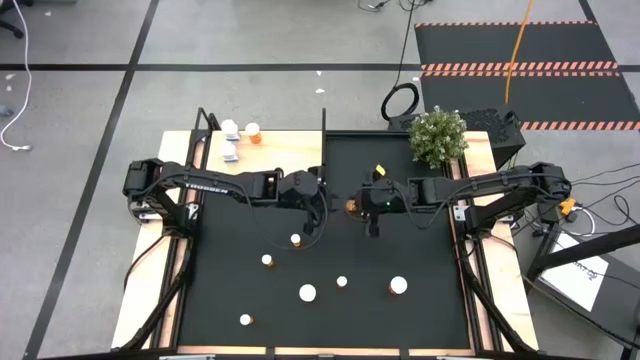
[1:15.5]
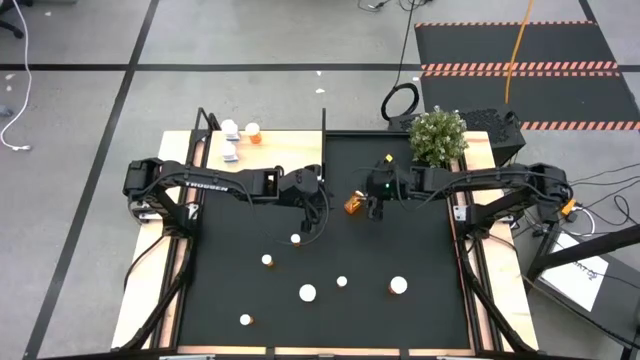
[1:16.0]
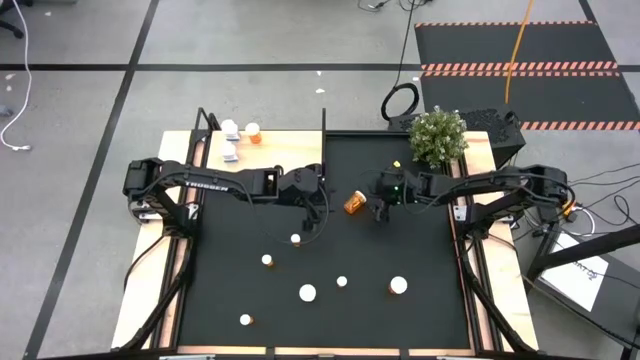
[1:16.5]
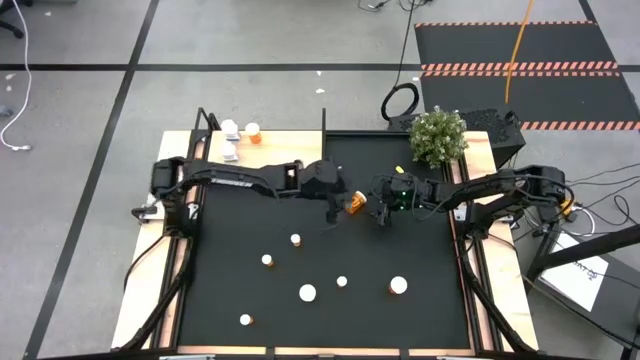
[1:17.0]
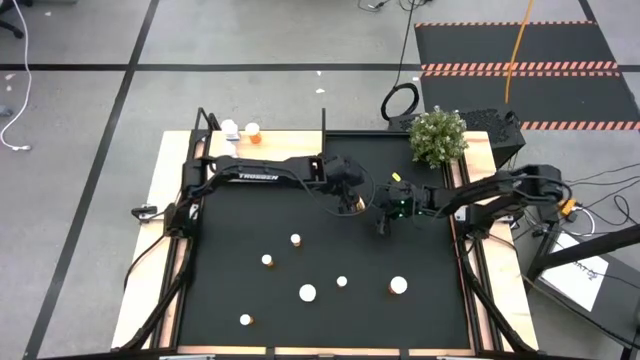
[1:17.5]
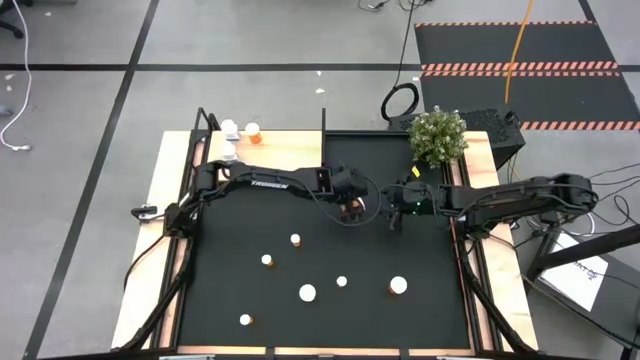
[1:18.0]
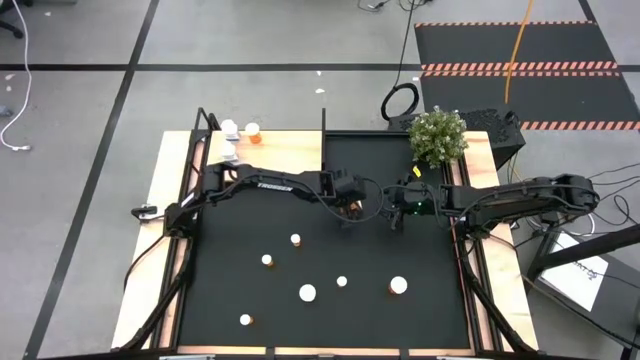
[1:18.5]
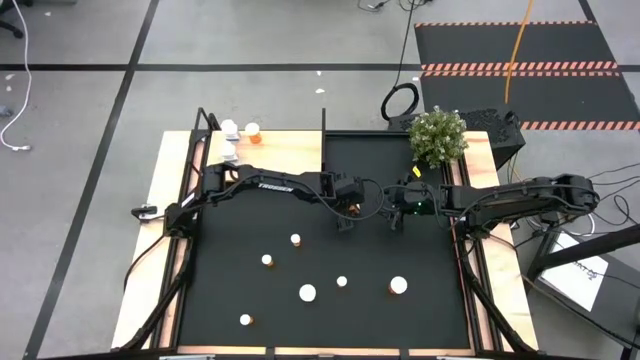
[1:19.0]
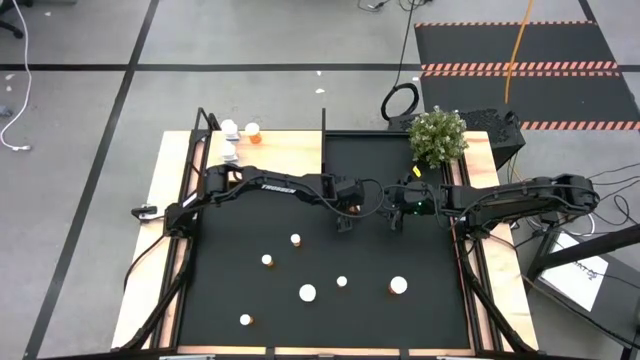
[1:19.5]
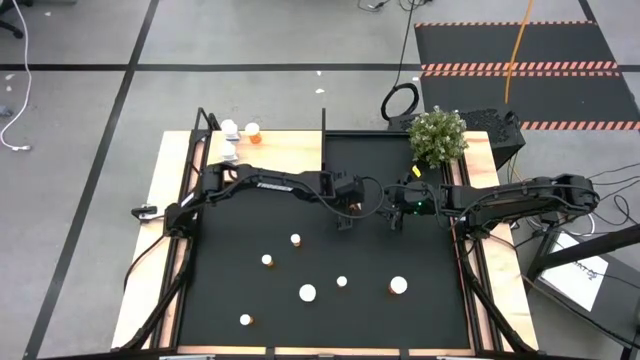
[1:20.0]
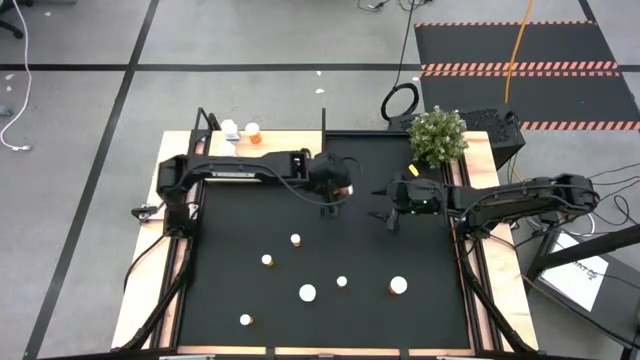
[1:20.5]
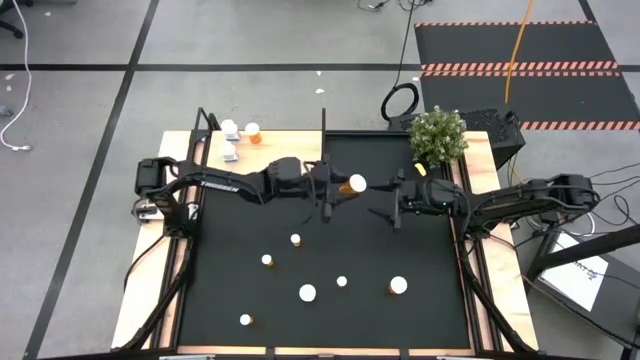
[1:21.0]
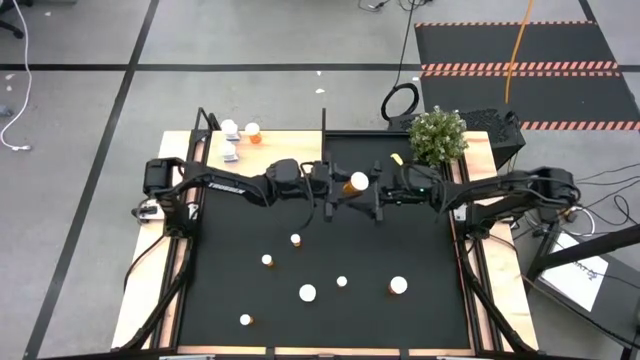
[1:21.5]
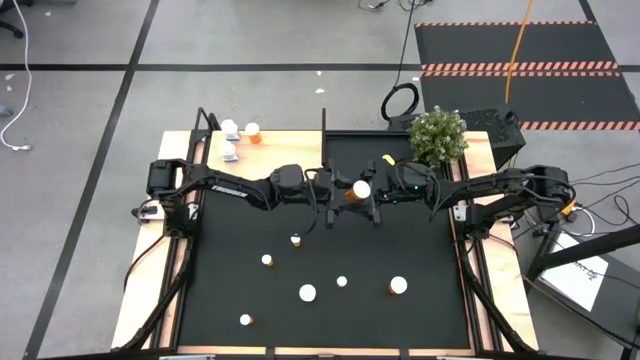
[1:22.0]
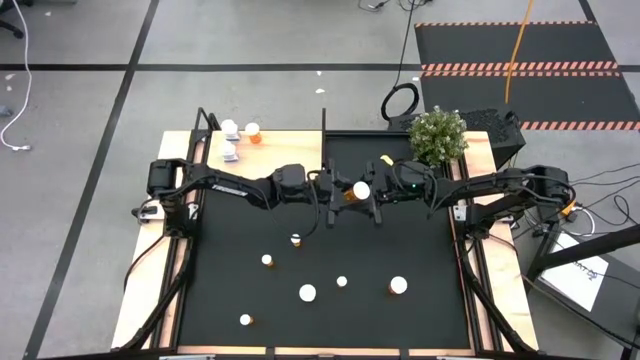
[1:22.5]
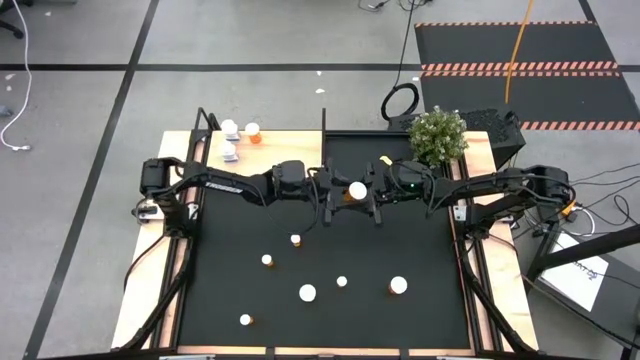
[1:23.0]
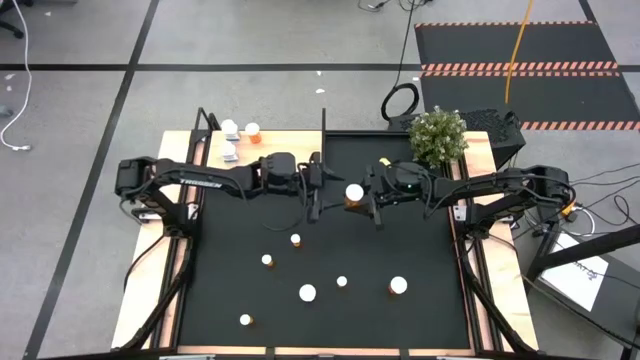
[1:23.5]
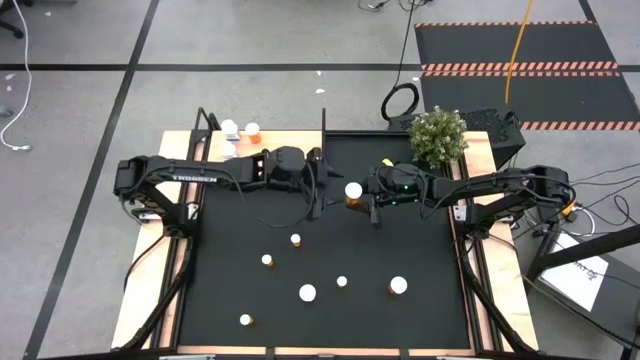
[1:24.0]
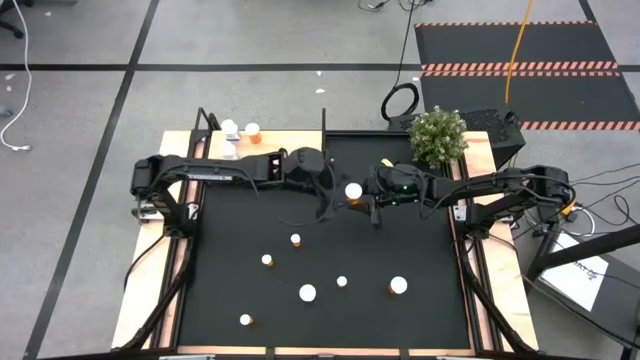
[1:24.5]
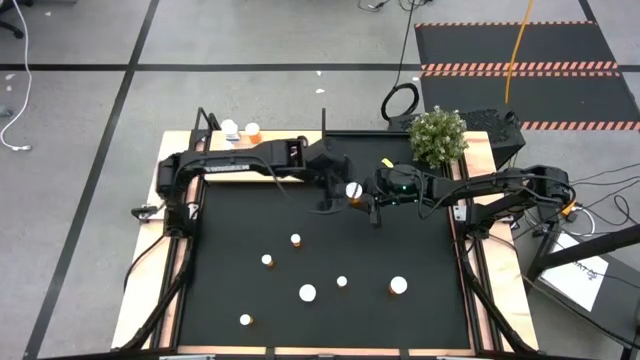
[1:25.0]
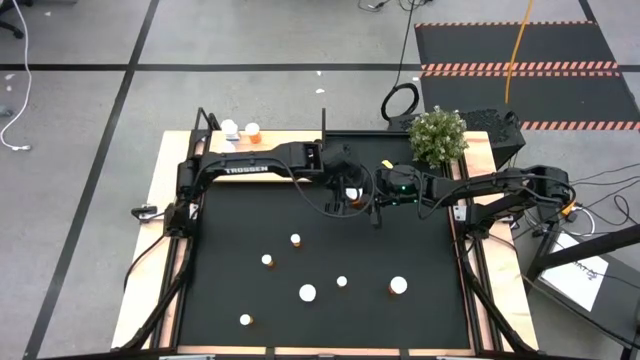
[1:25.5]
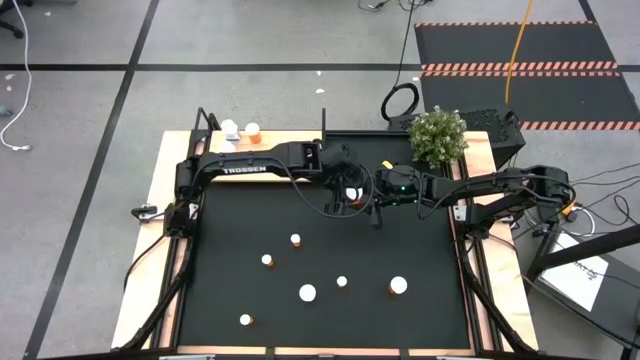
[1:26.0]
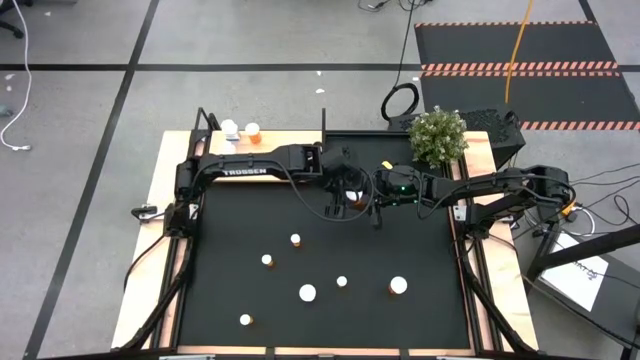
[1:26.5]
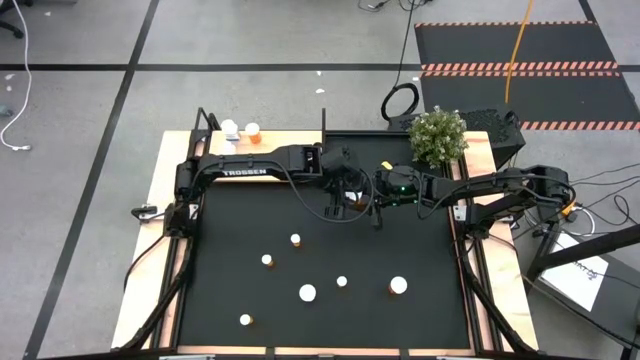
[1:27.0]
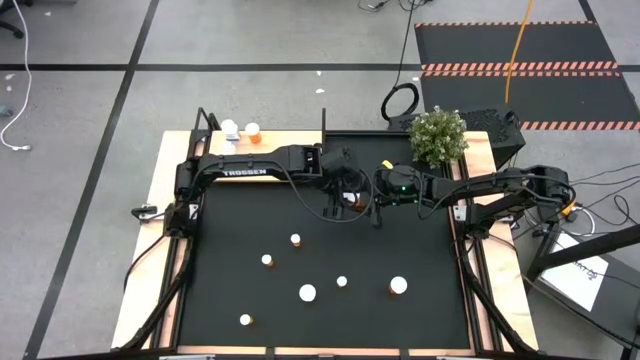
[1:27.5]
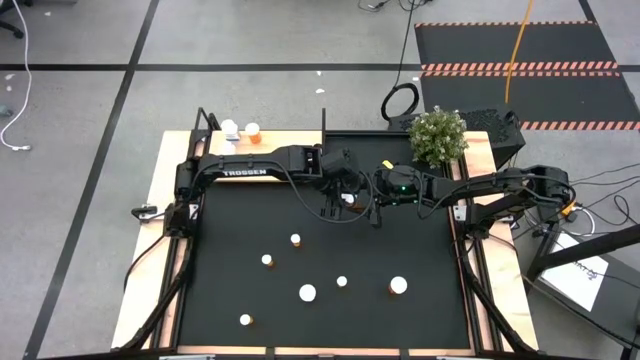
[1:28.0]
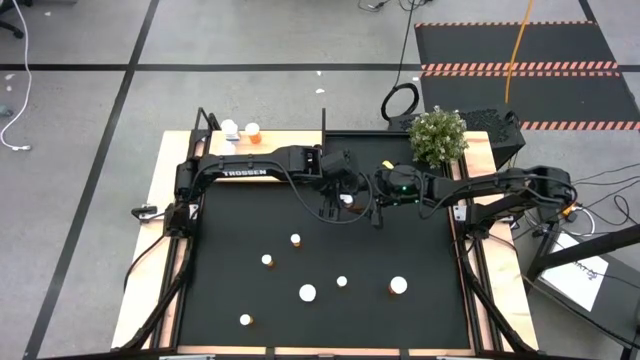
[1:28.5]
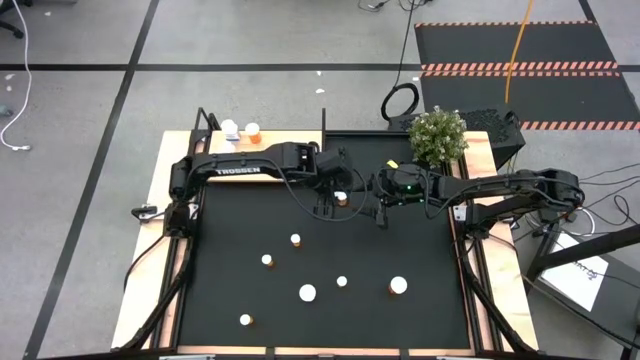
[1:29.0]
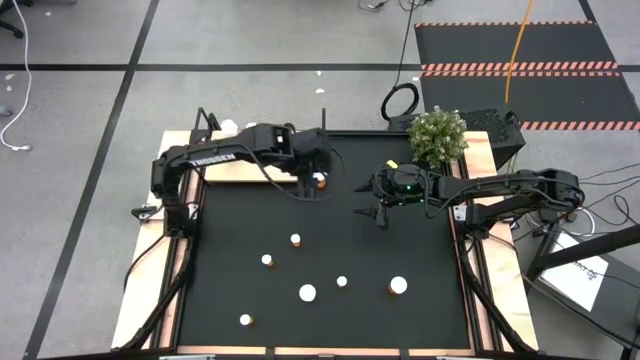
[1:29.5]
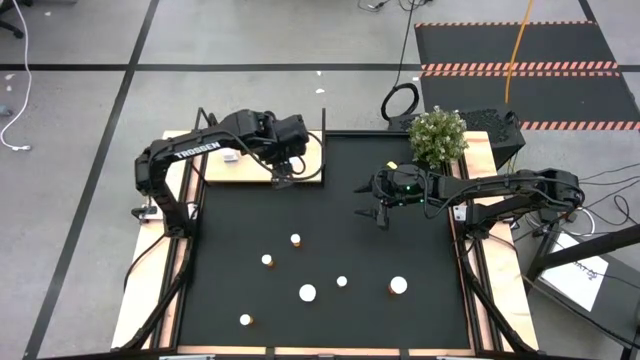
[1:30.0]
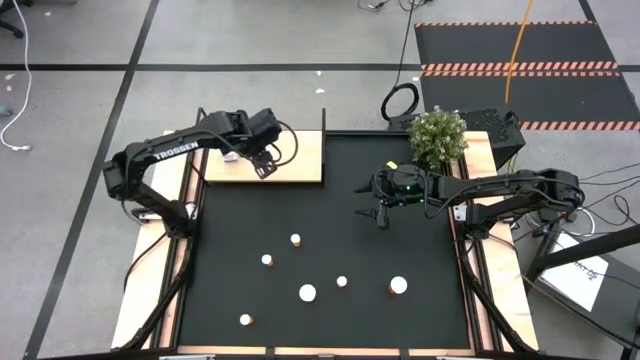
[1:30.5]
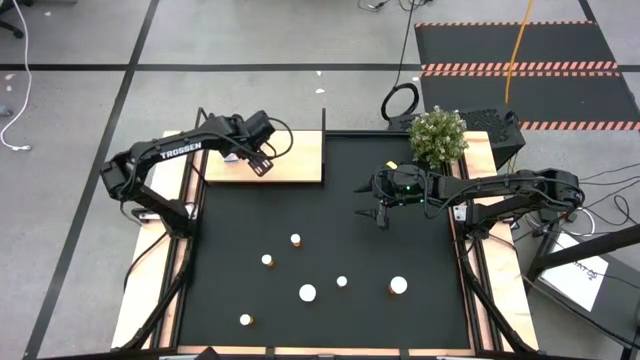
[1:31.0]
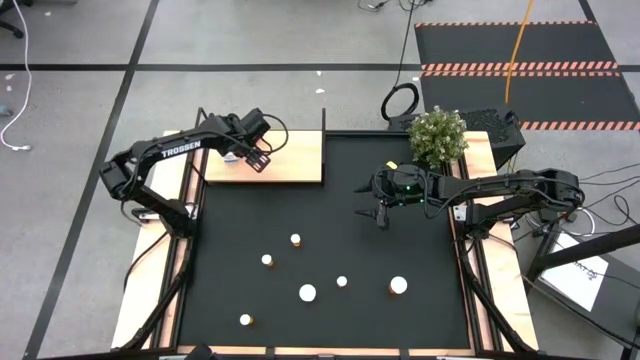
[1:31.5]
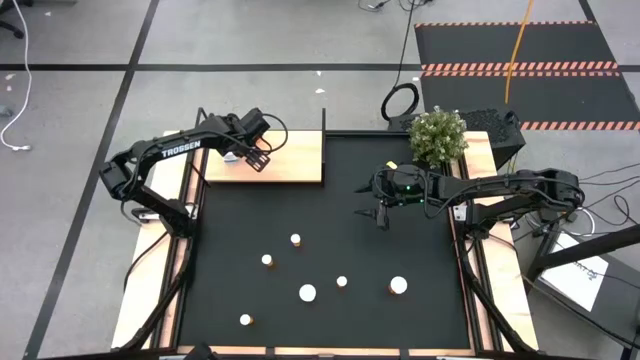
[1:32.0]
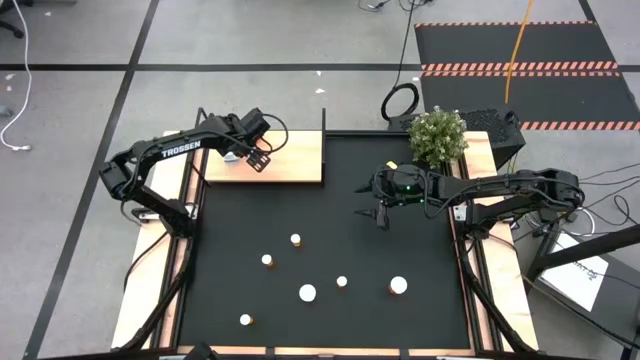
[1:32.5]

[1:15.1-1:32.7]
Task: Pick and place medicine bottles onto shelf by color
Put the large orange pill bottle aligned with the other large orange pill bottle on the shelf

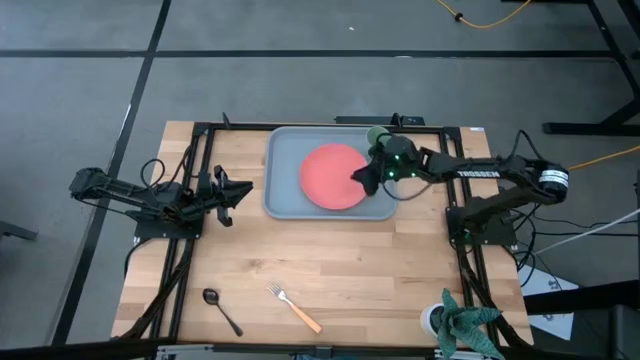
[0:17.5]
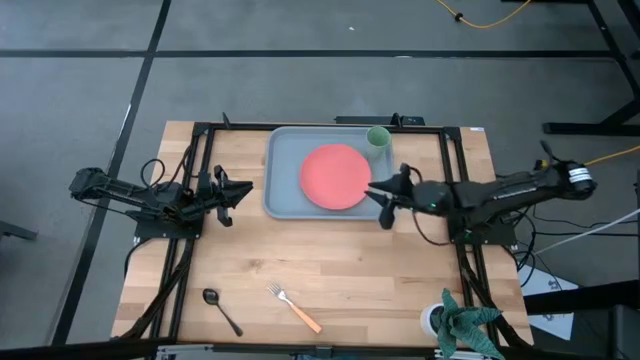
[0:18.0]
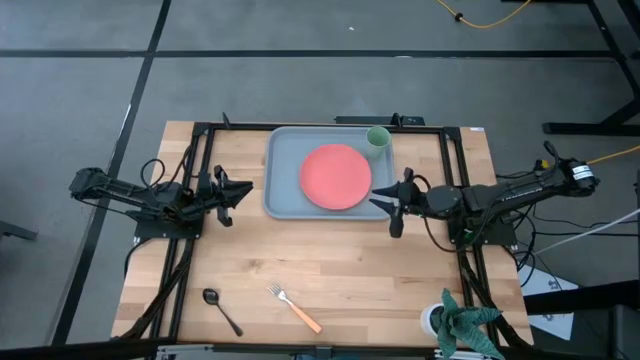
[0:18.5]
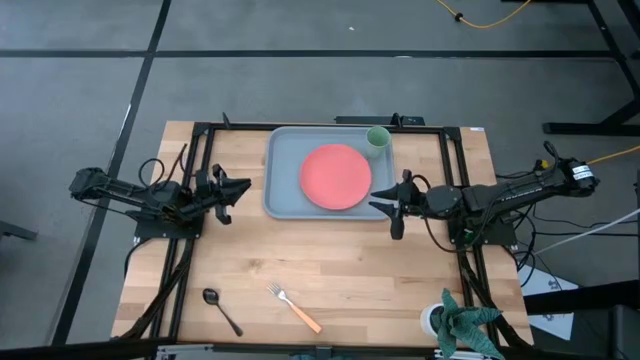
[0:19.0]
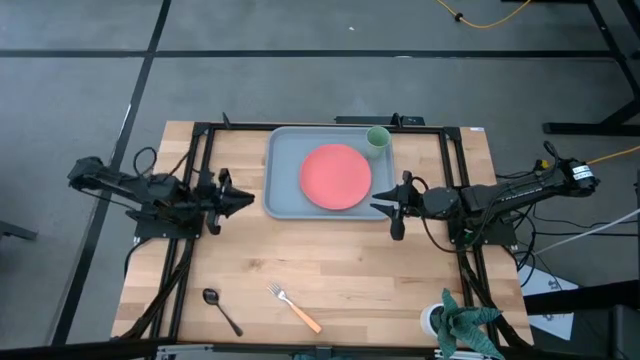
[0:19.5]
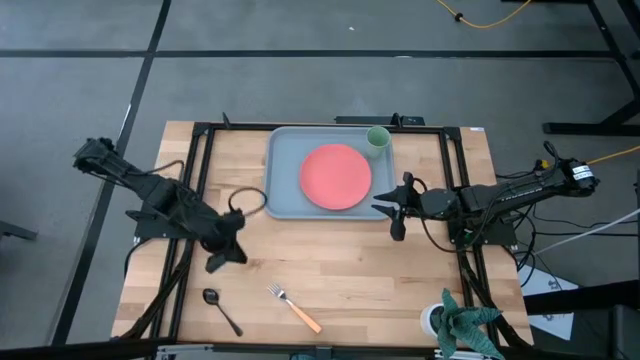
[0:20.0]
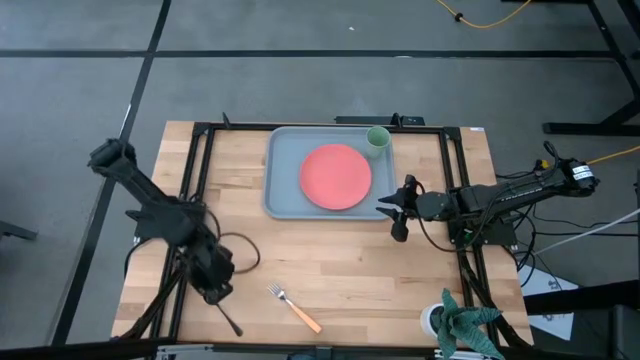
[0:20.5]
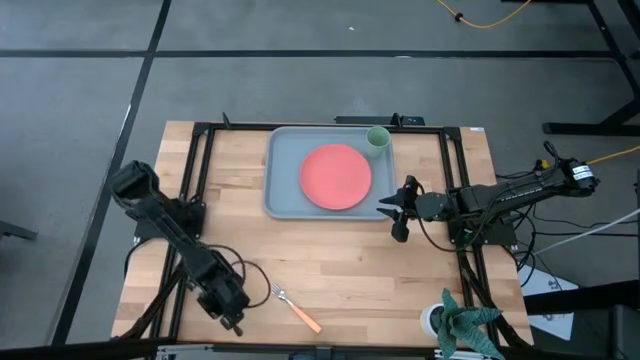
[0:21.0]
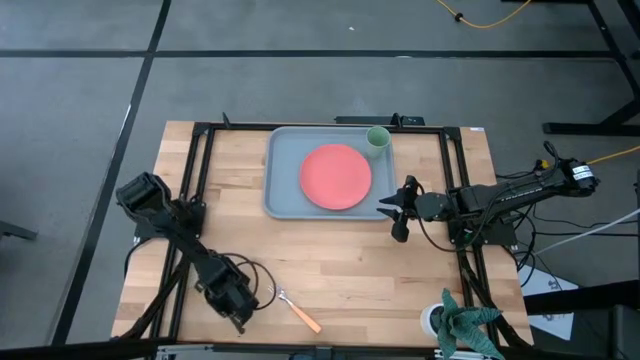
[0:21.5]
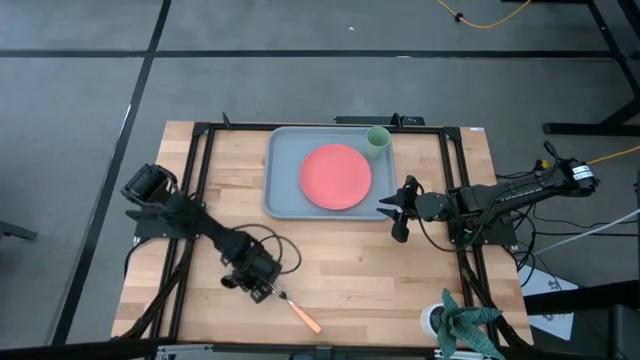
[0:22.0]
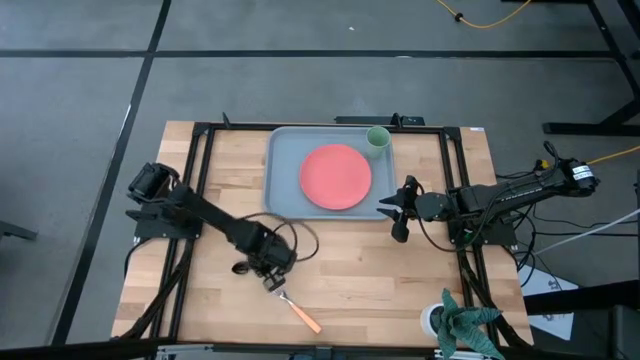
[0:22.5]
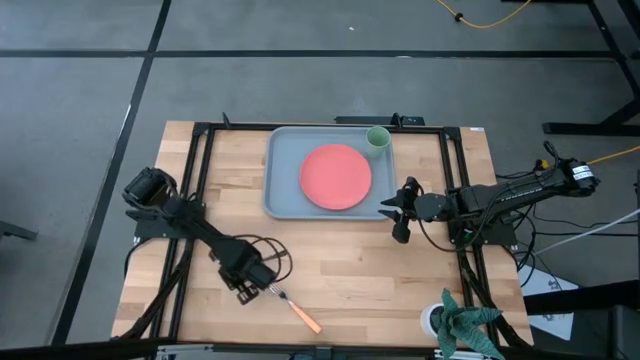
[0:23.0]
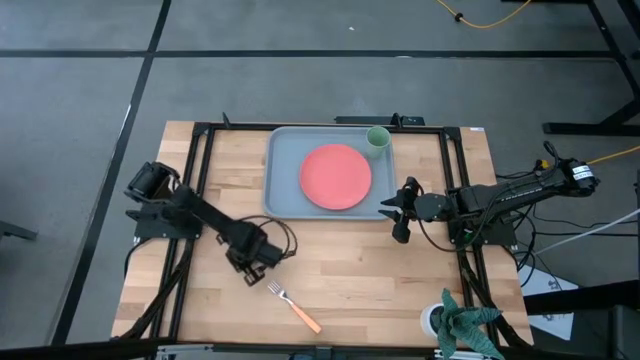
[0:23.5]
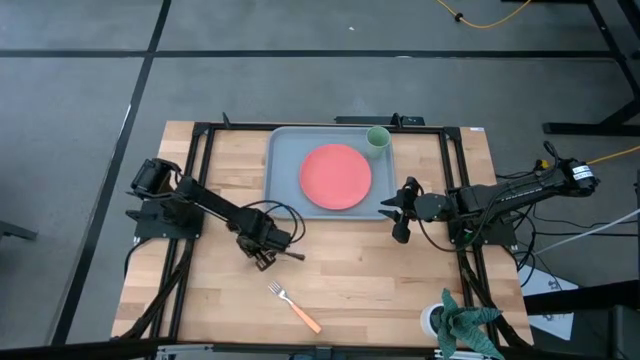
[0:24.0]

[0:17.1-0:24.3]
Task: Pick and place plate/cup/fork/spoon on tray
Move the black spoon to the center of the table
